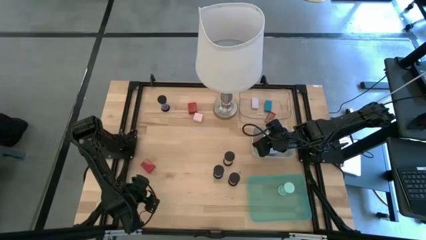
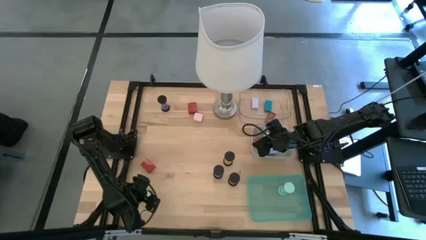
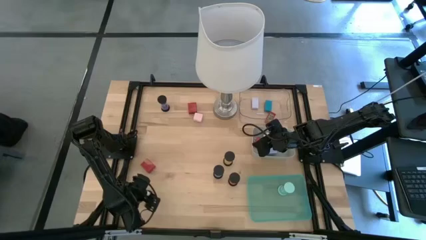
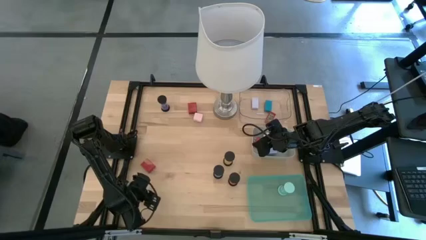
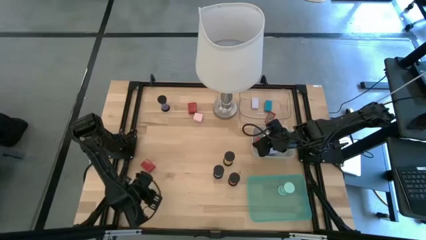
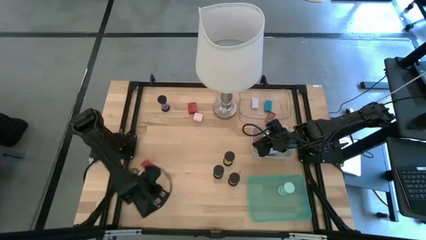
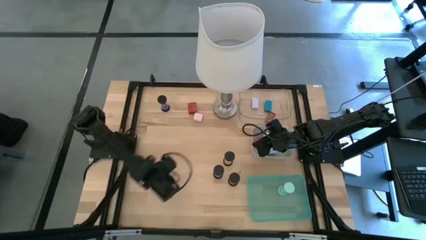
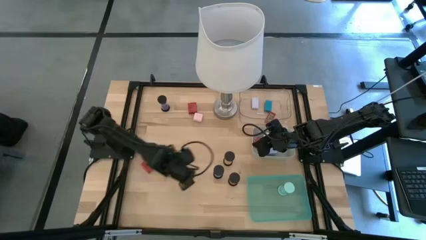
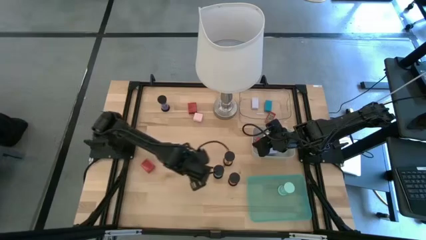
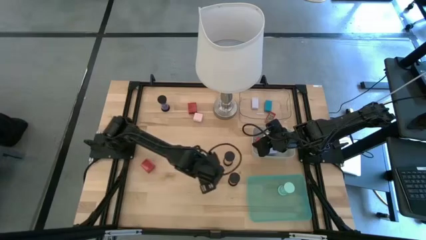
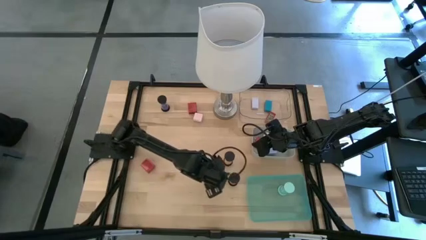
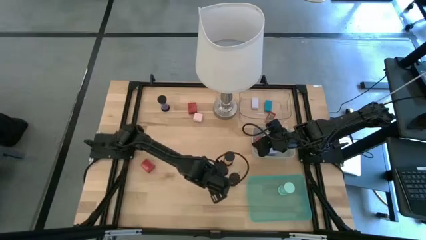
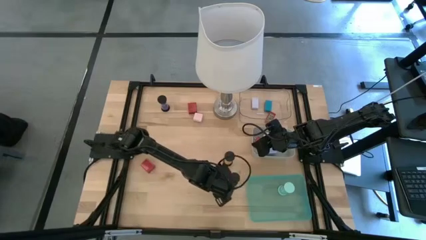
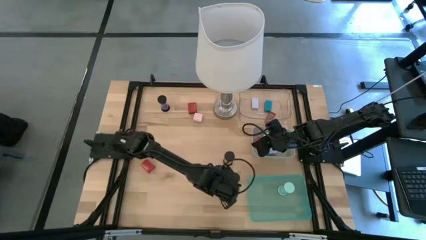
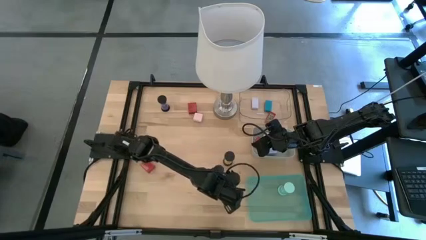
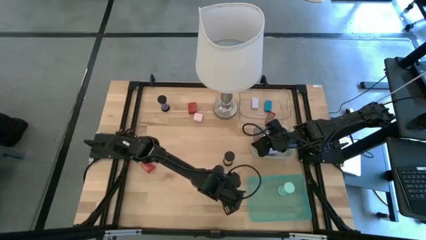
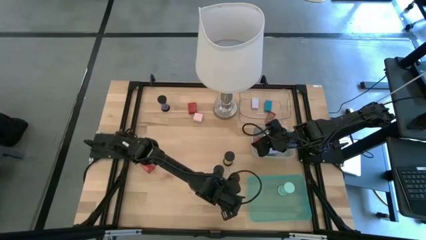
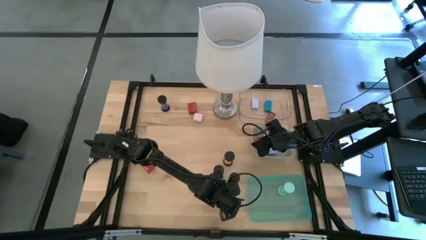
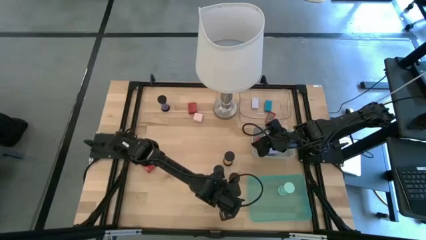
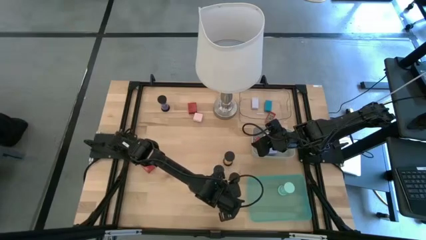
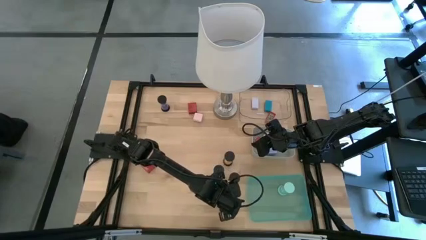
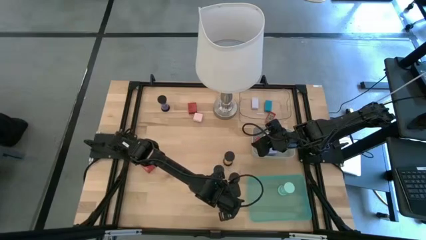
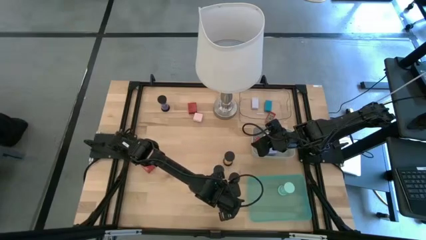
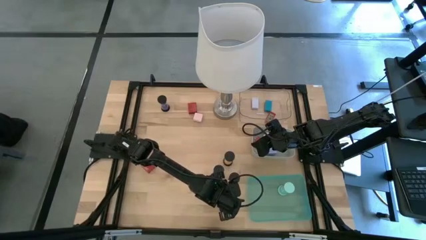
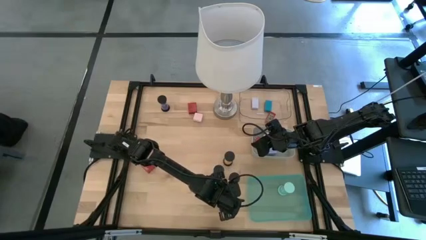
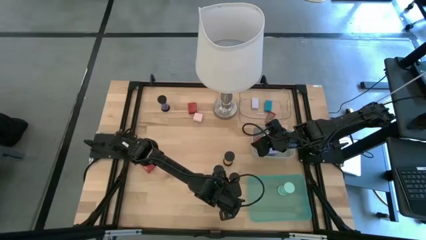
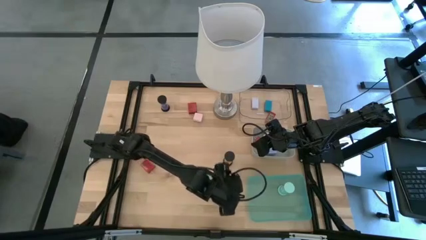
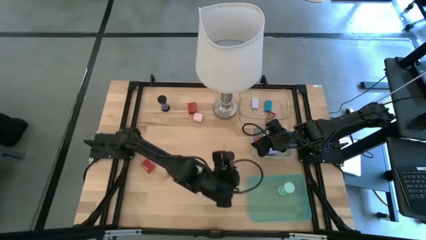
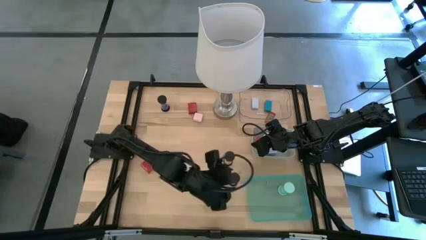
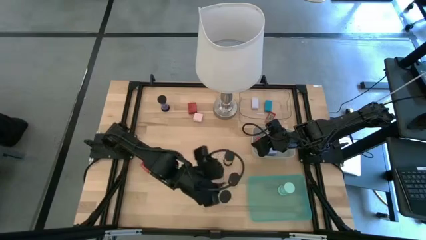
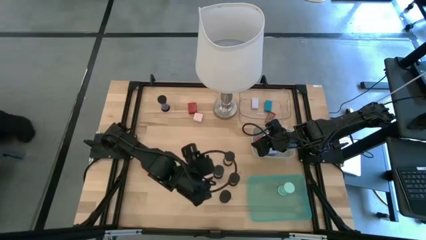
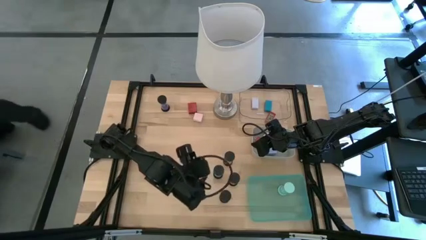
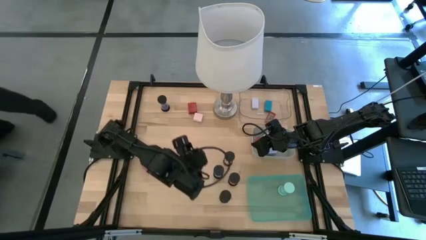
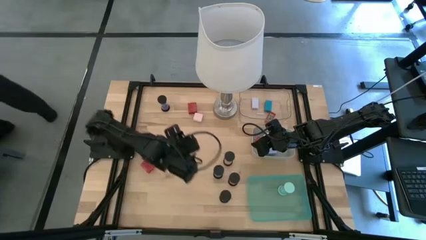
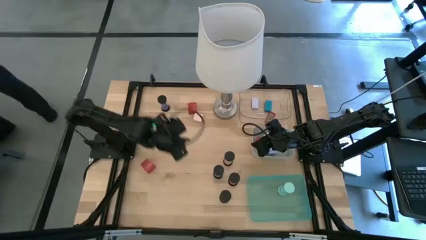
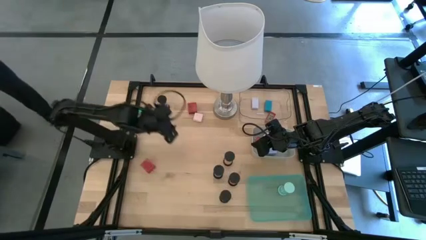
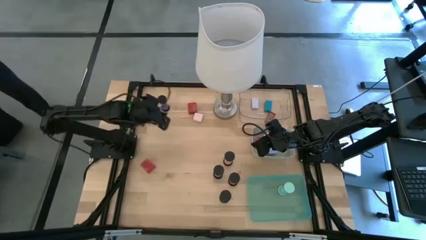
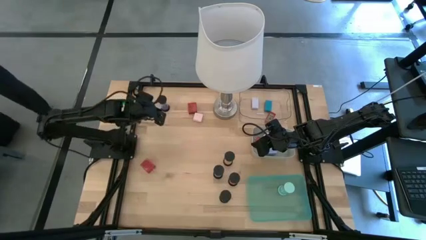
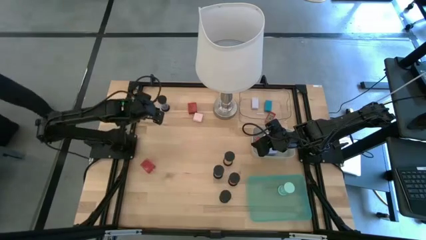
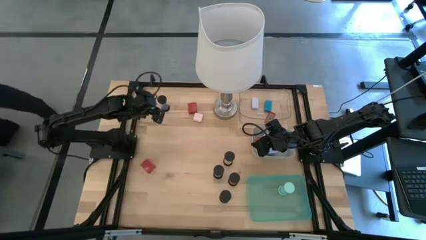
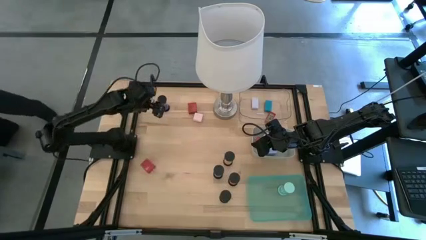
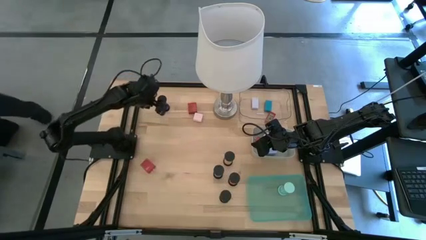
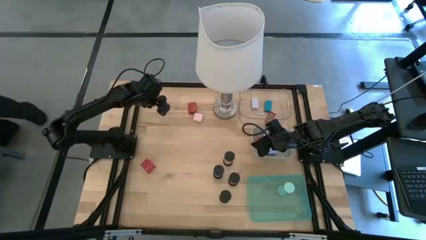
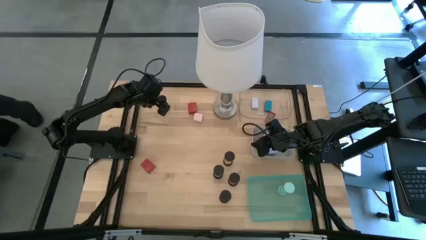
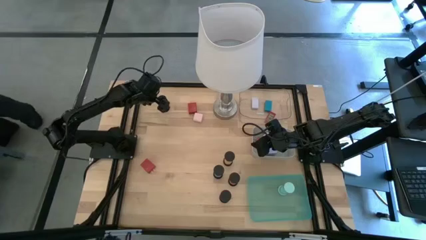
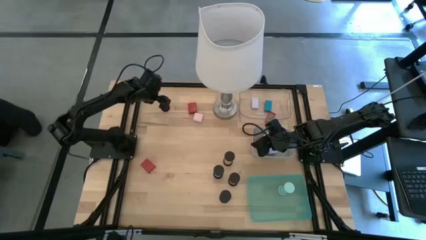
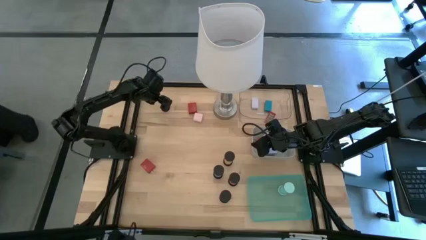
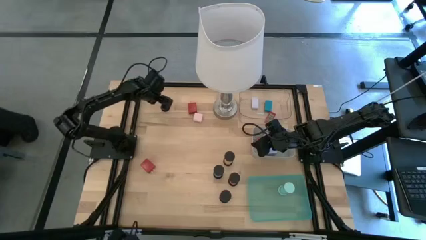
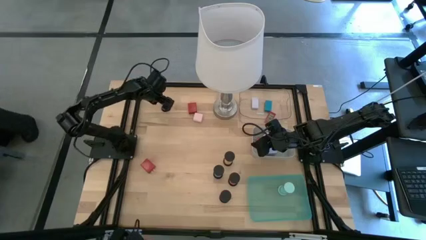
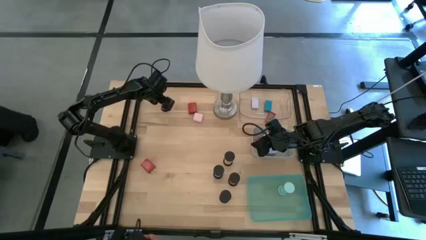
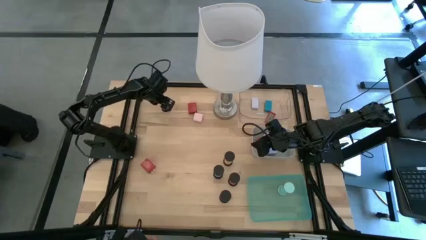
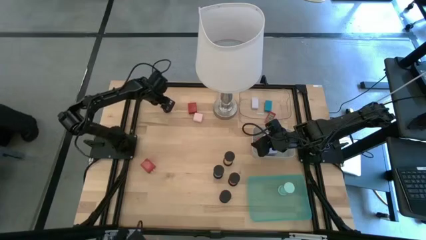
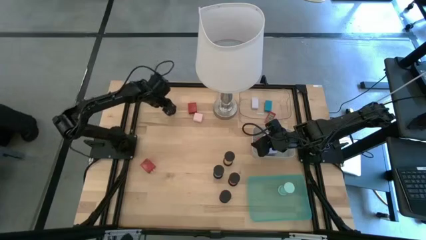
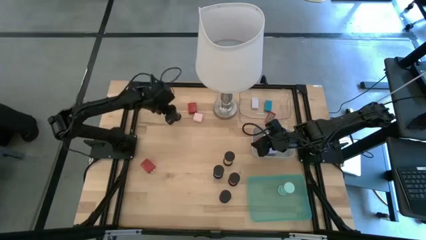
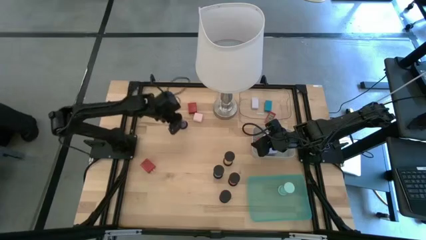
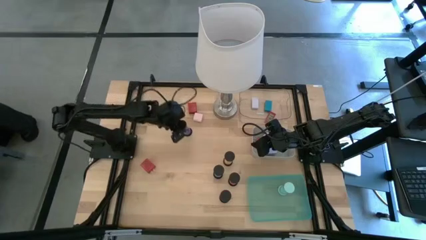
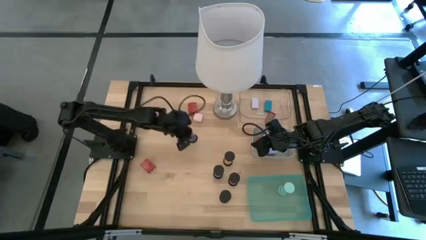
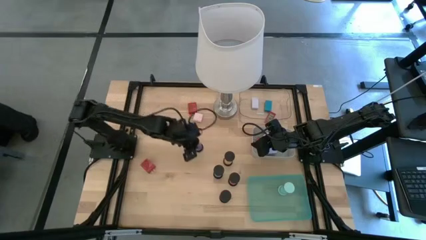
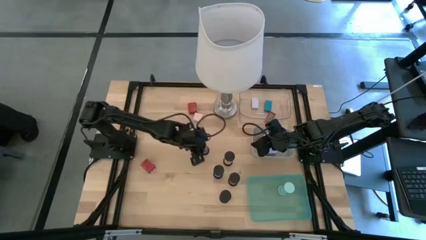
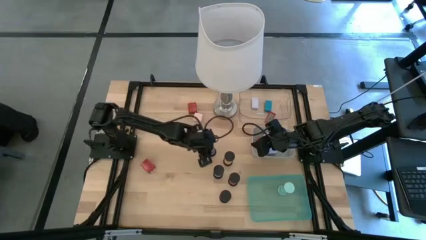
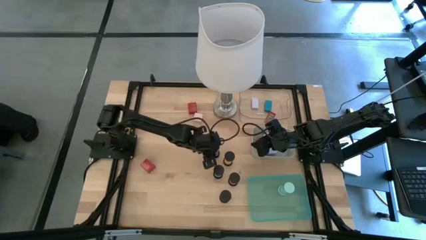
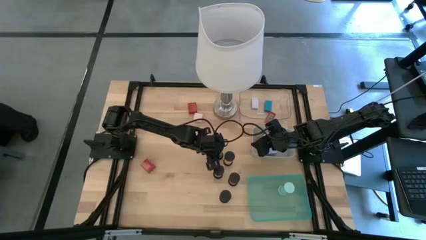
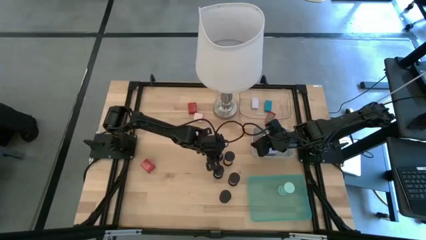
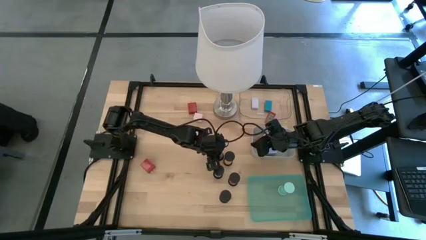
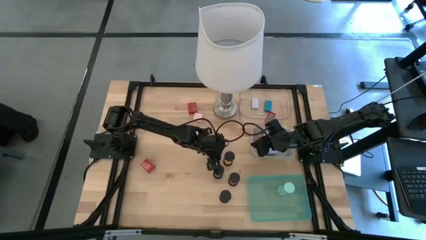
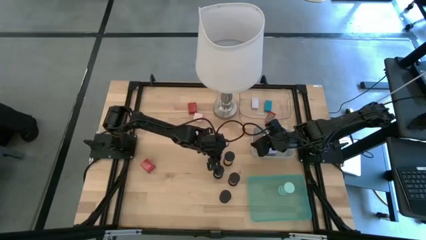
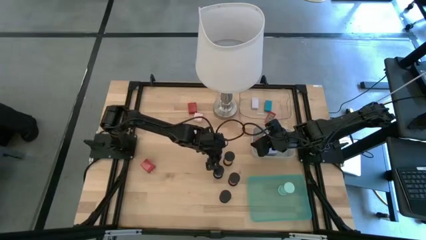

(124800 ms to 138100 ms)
Task: Pick & Place Office items
Move the hourglasses to the middle of the table
